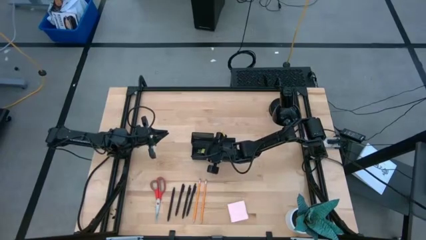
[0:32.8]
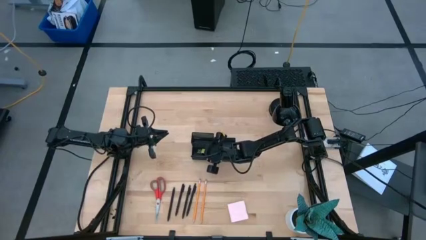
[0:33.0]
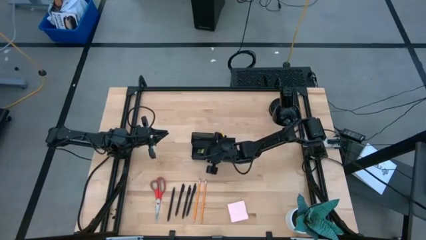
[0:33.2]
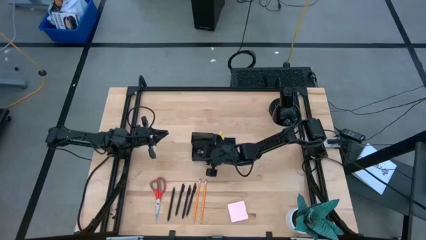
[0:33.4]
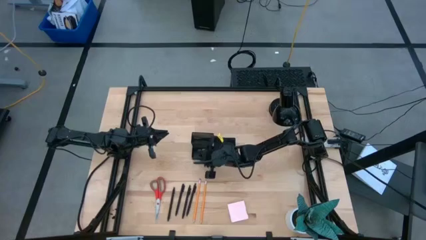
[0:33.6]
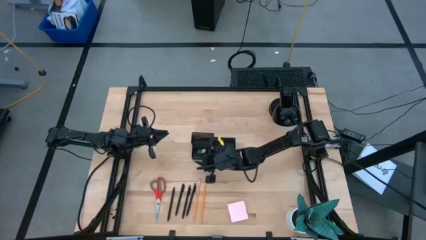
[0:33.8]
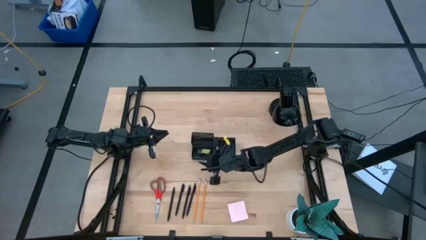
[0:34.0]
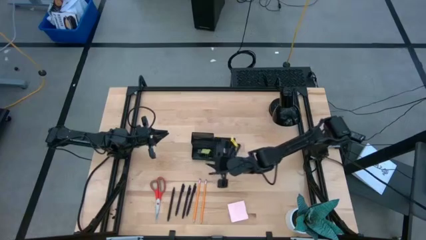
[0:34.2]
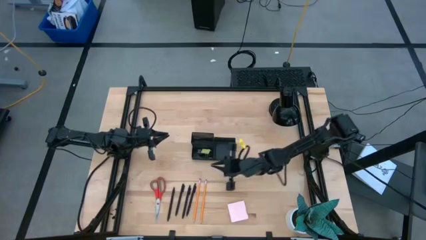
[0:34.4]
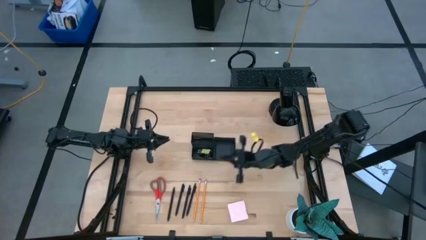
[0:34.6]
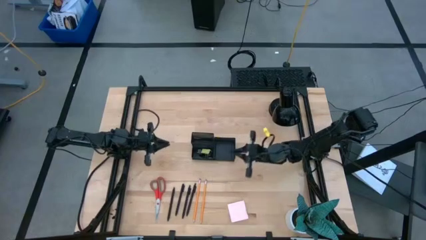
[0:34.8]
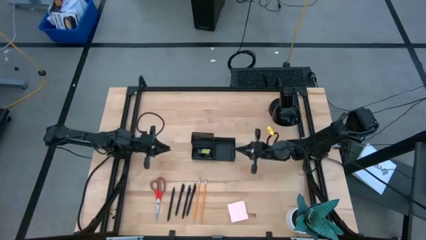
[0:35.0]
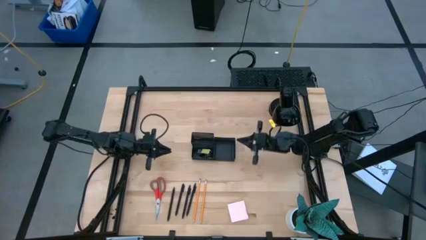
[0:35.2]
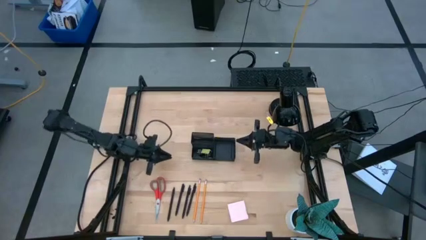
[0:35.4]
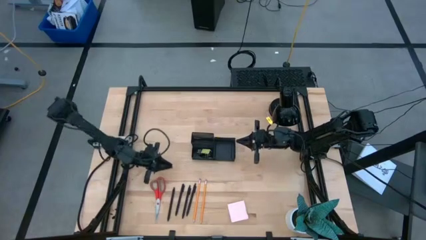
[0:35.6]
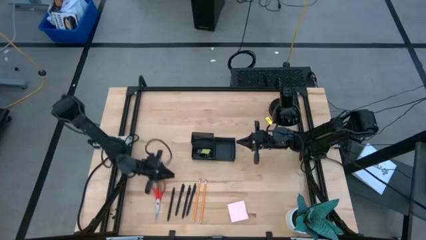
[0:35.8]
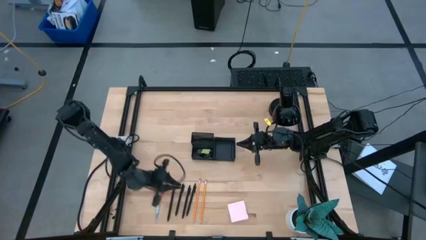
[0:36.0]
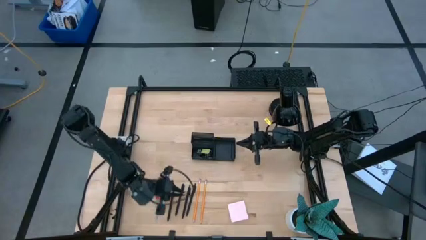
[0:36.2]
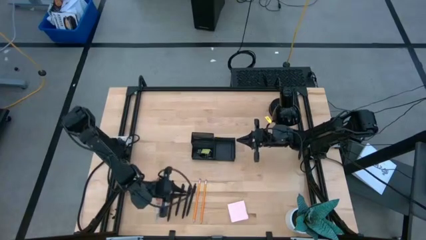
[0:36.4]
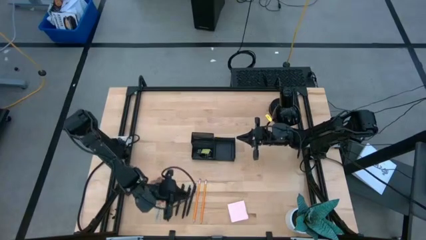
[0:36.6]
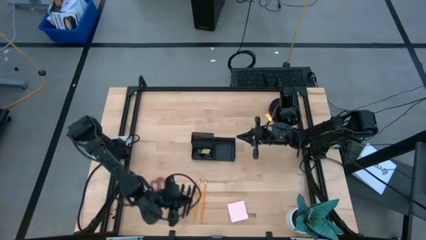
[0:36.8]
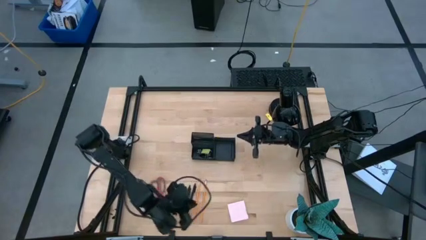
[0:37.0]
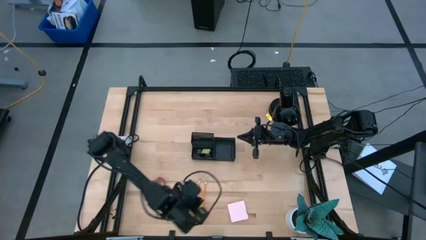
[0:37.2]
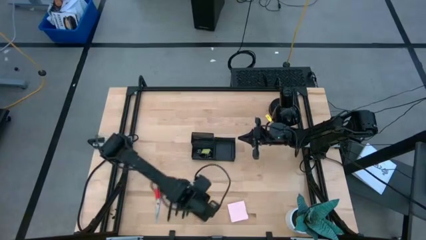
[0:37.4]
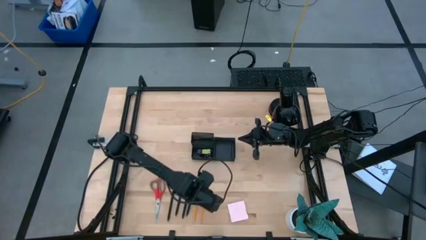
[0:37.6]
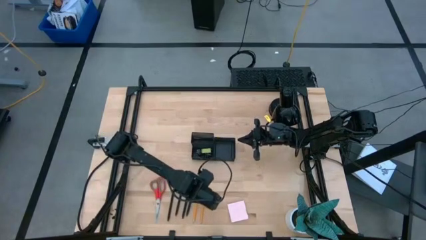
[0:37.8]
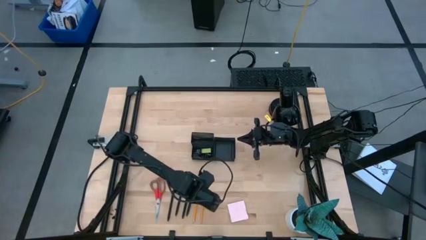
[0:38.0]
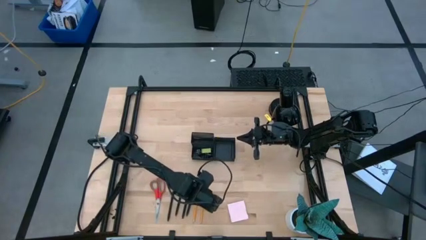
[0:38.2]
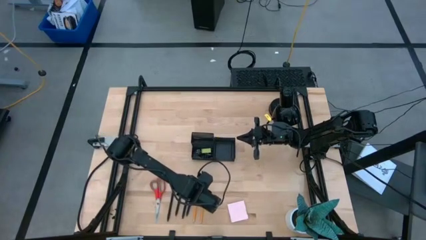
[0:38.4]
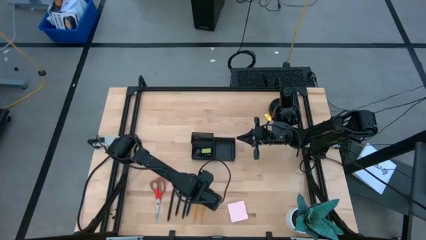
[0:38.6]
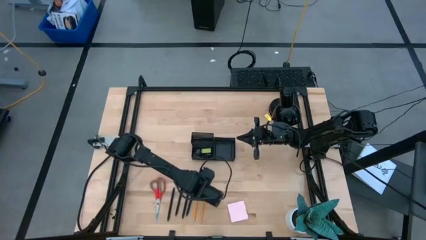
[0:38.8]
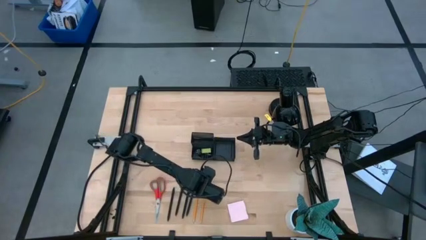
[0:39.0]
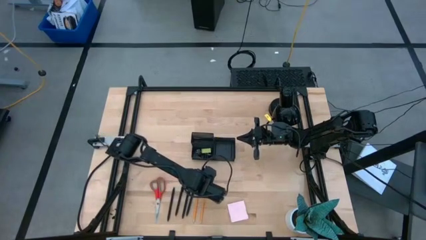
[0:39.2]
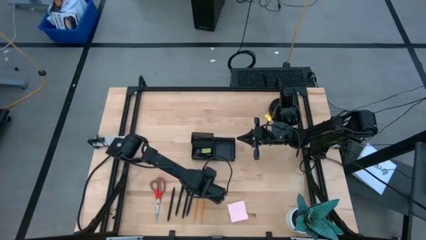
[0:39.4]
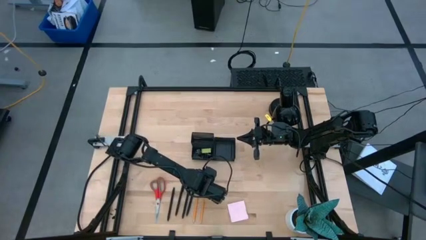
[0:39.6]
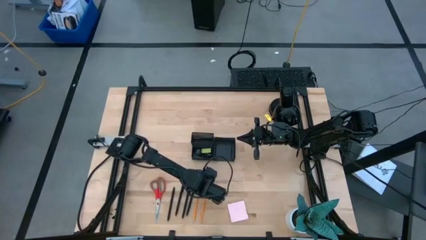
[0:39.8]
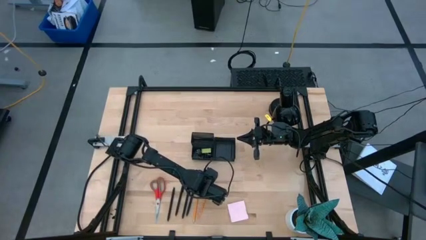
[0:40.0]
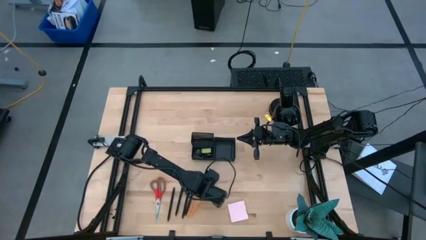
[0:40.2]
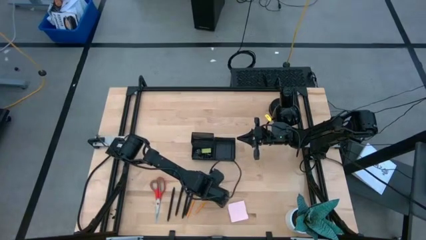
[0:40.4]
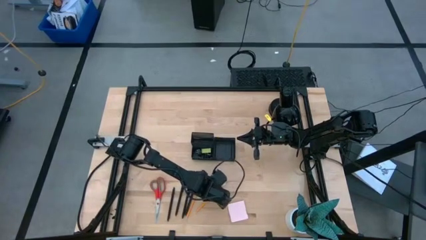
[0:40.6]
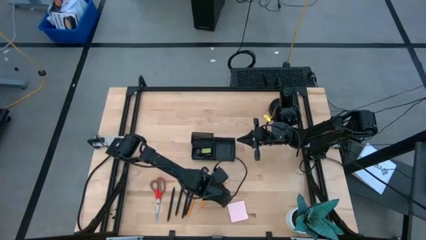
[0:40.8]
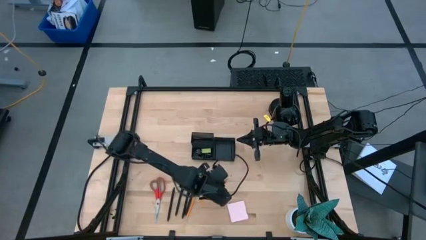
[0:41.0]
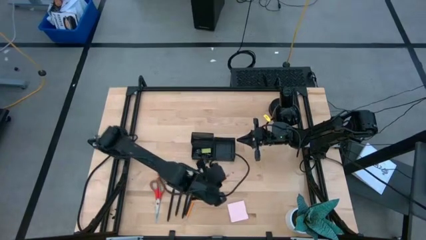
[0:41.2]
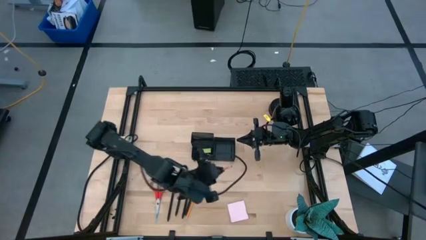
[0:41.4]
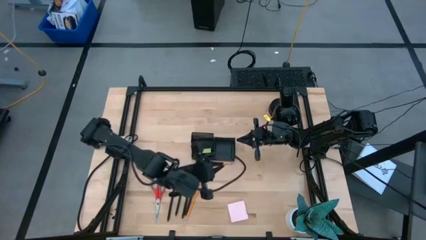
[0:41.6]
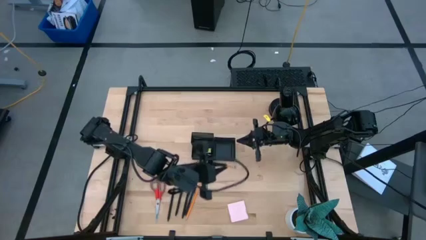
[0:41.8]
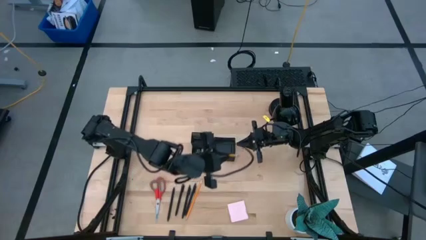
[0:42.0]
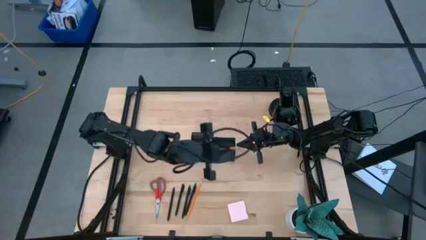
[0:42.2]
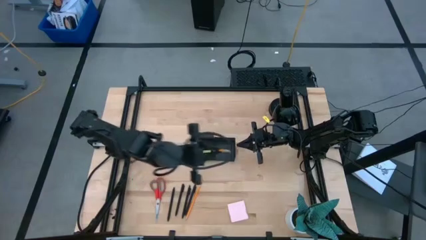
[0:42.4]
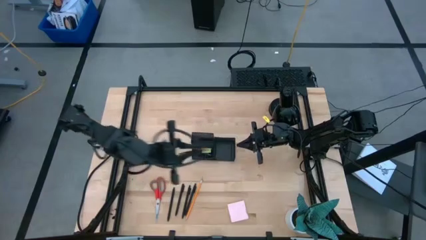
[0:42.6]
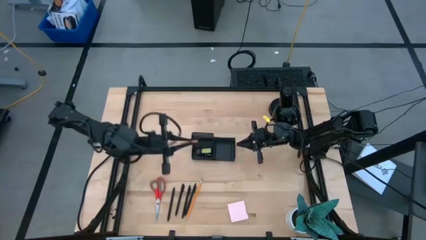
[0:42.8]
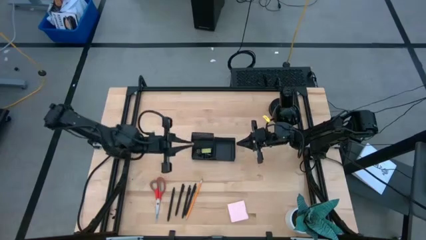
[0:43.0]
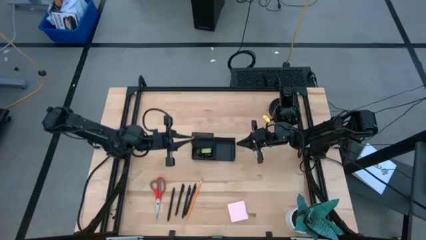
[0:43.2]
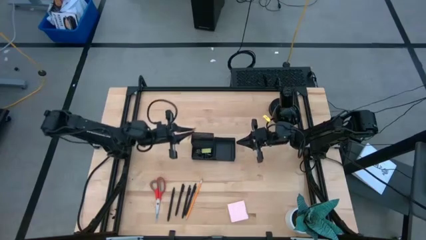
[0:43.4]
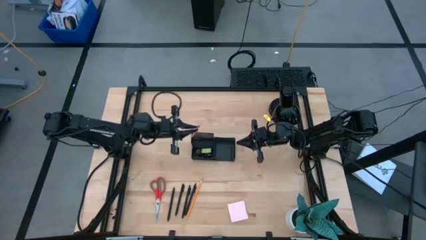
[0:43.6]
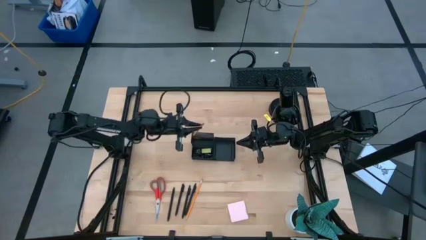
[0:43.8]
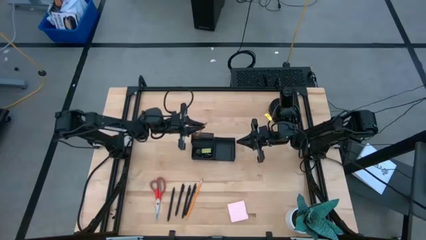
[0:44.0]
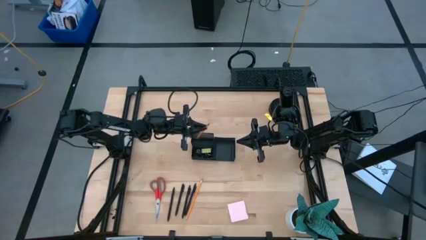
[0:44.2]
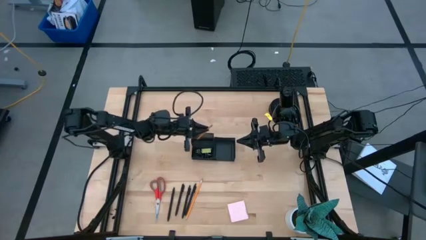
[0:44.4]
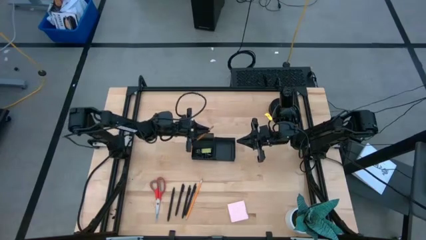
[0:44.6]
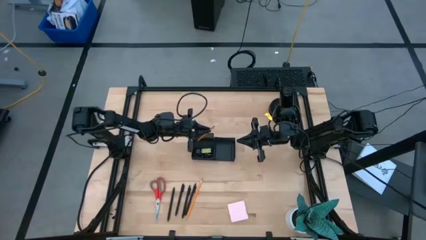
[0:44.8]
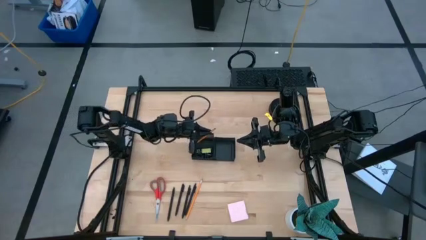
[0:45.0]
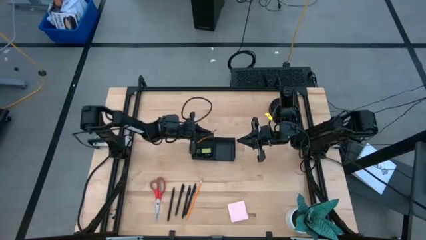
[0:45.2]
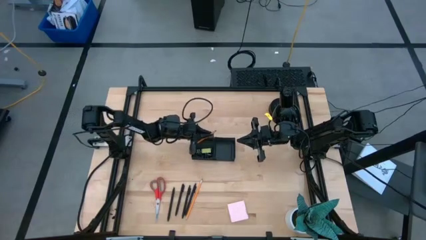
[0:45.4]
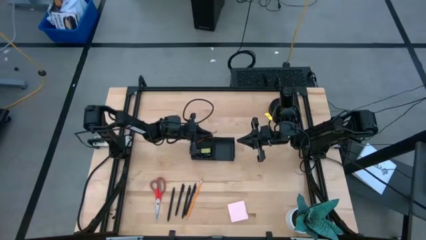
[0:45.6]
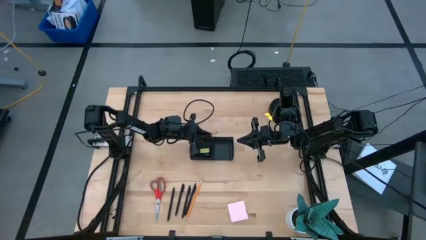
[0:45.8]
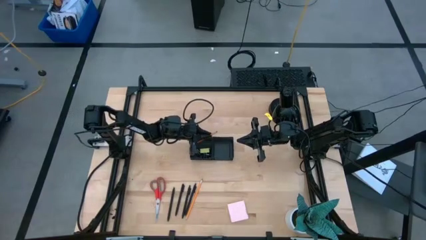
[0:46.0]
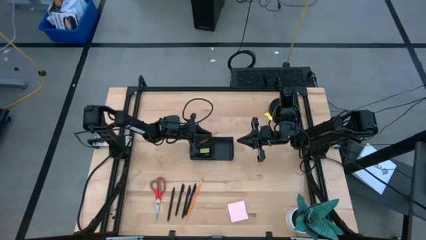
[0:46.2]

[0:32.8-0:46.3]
Task: Pick and place office supplies into organizer
Put the right orange pencil into the black desk organizer
